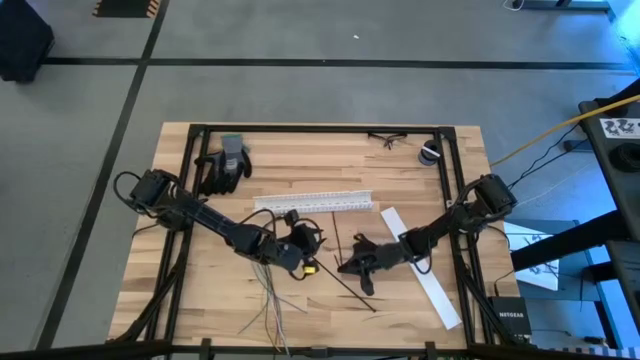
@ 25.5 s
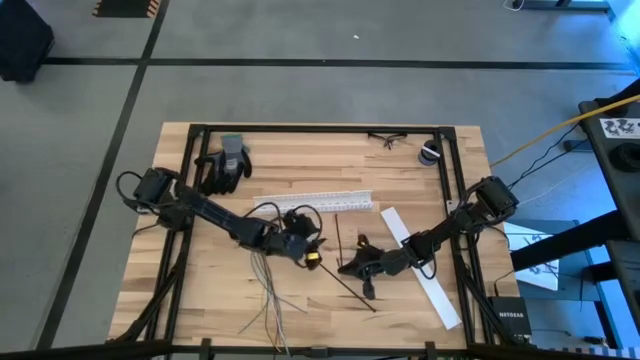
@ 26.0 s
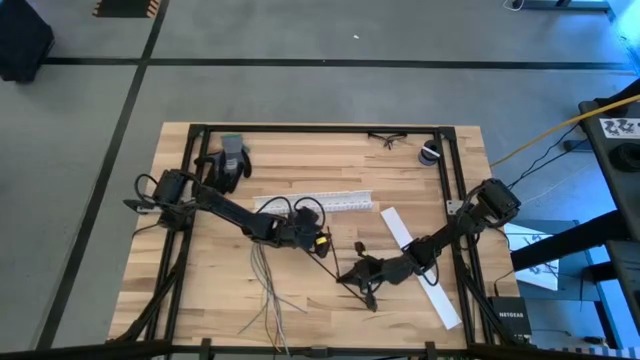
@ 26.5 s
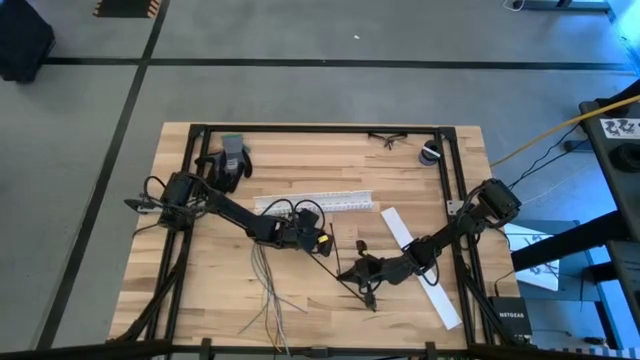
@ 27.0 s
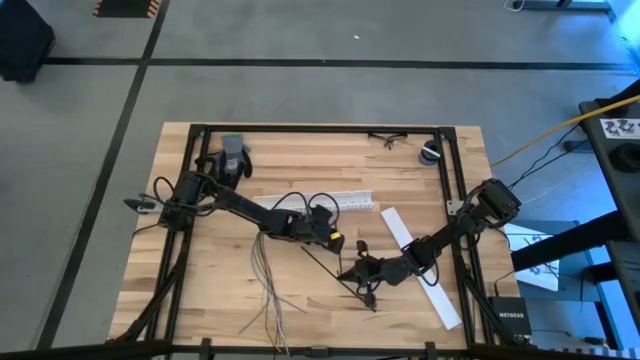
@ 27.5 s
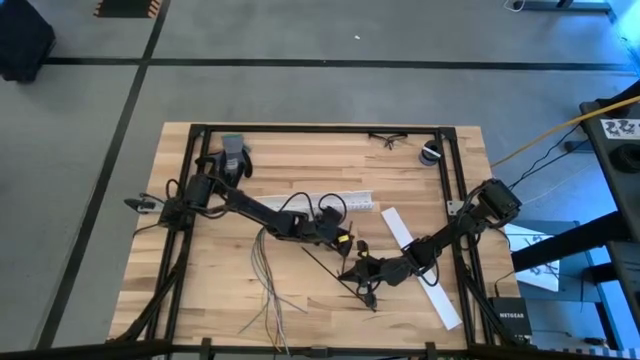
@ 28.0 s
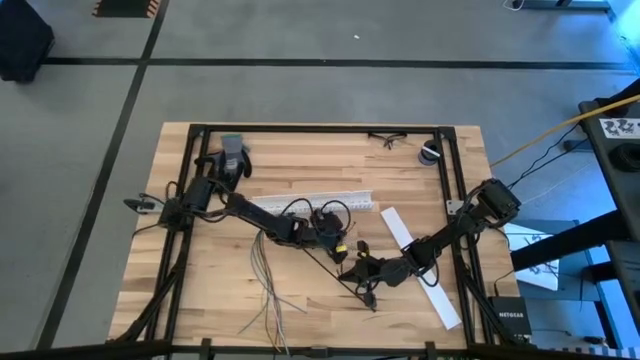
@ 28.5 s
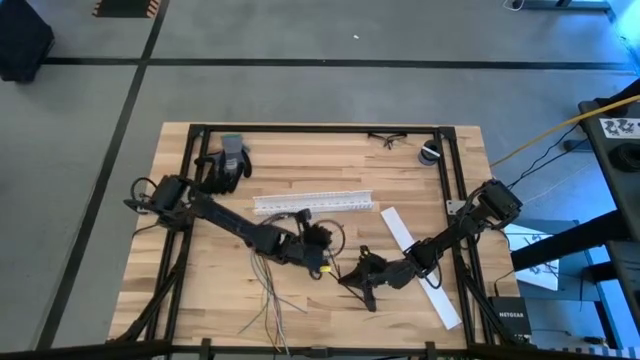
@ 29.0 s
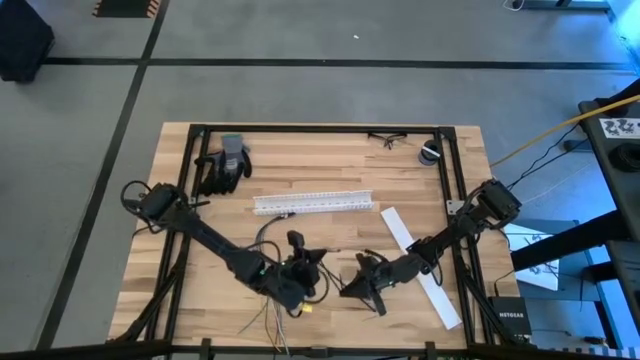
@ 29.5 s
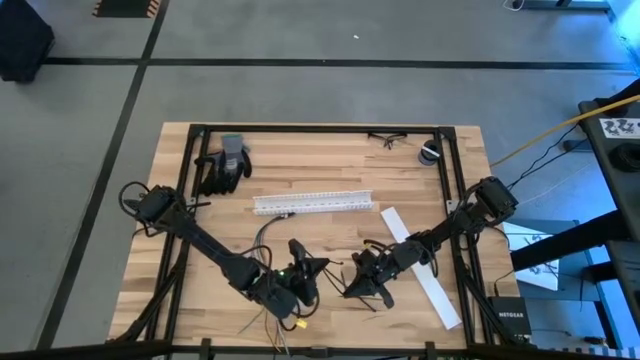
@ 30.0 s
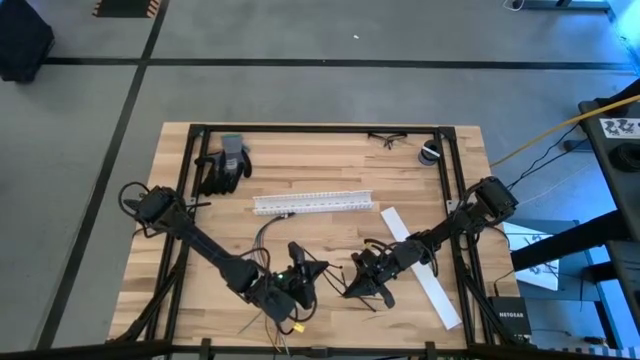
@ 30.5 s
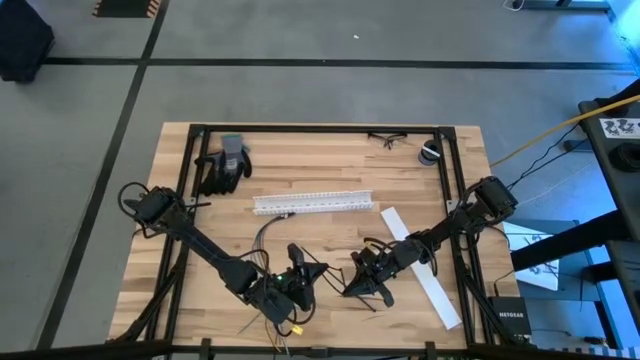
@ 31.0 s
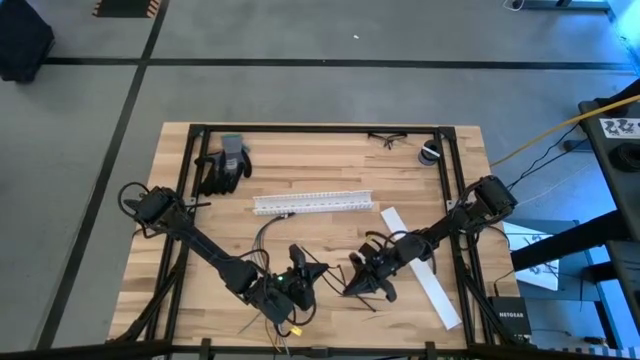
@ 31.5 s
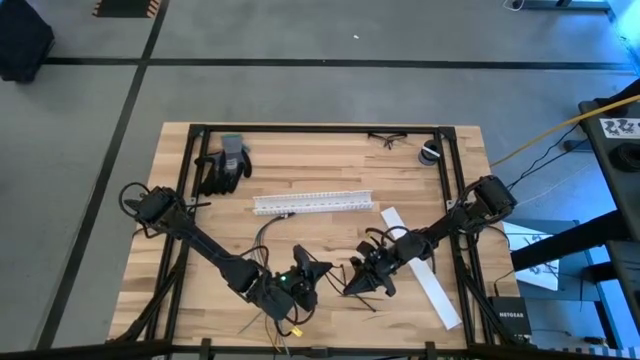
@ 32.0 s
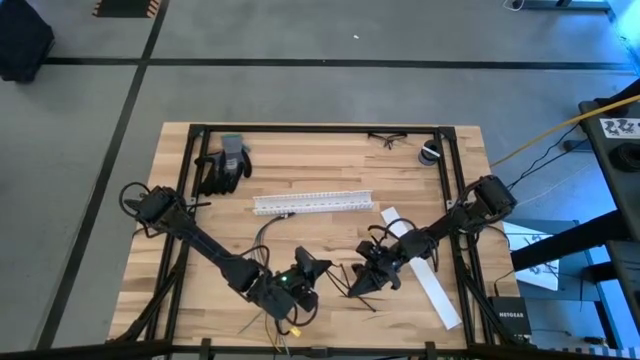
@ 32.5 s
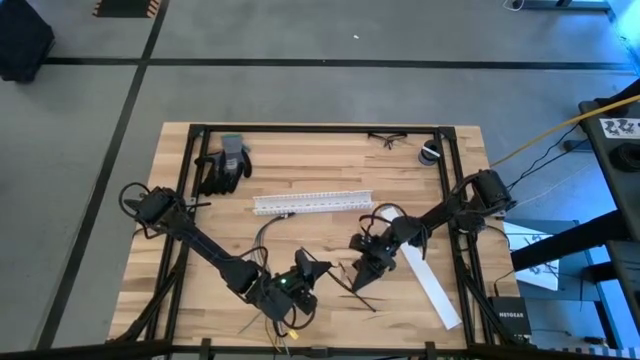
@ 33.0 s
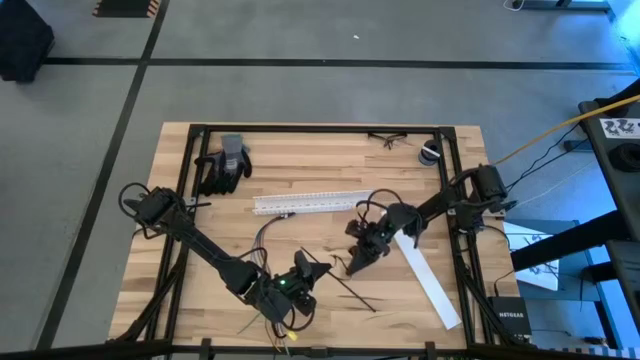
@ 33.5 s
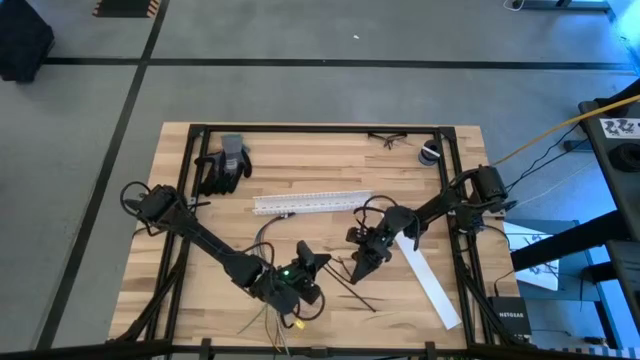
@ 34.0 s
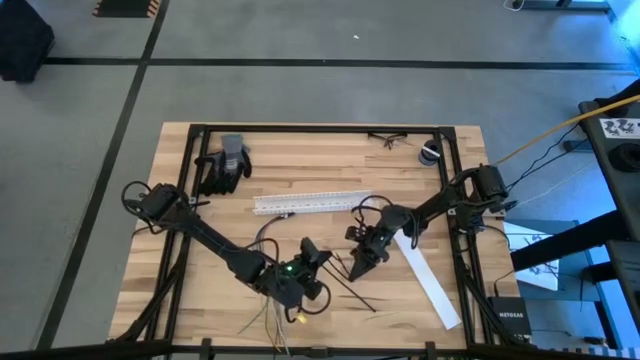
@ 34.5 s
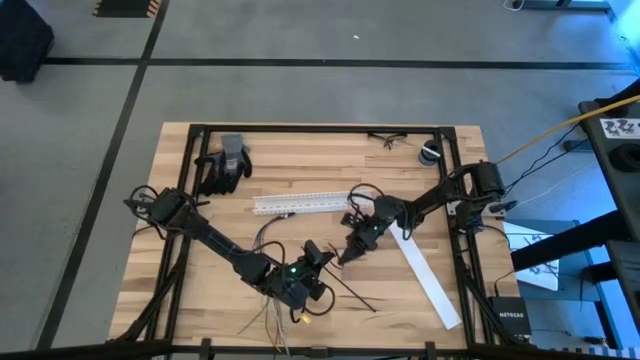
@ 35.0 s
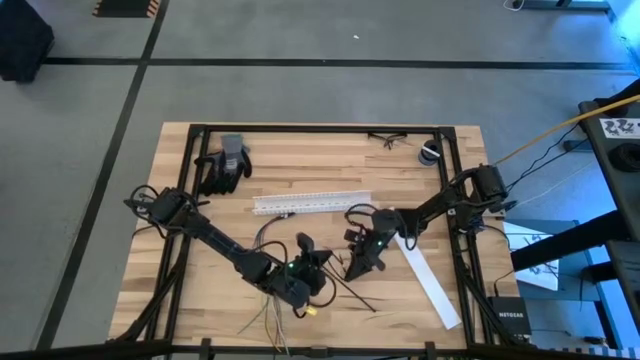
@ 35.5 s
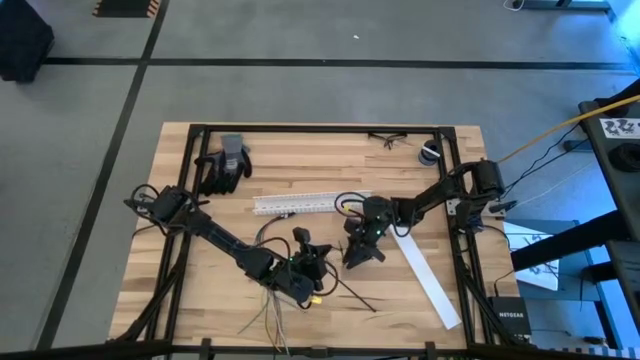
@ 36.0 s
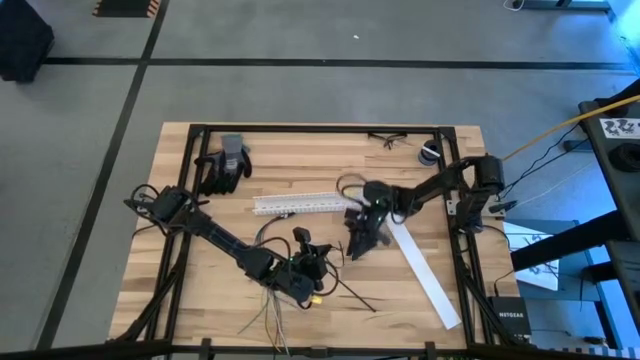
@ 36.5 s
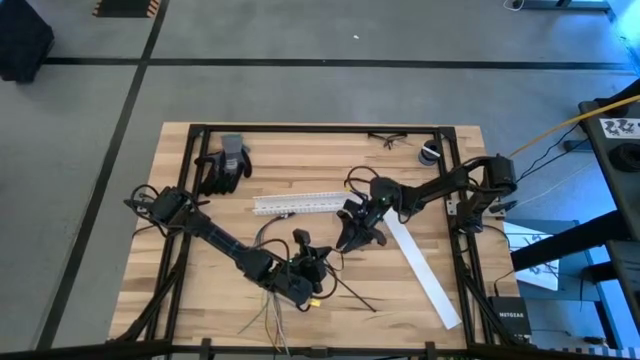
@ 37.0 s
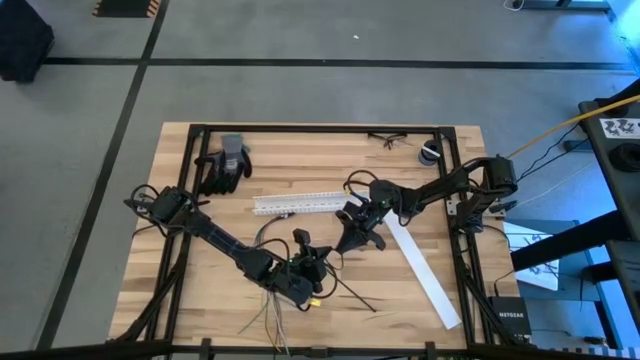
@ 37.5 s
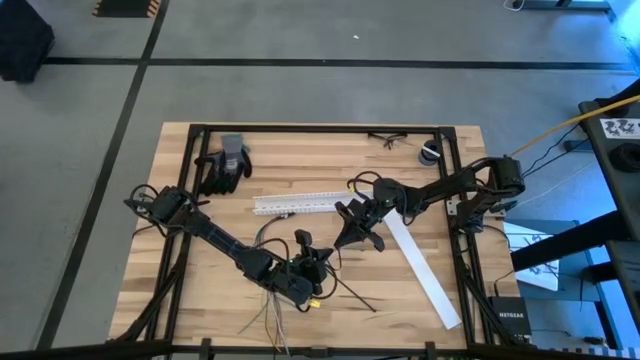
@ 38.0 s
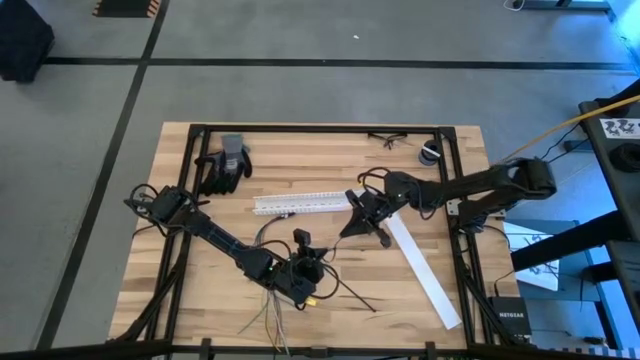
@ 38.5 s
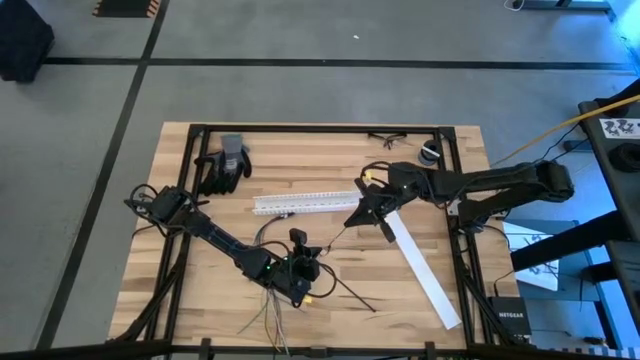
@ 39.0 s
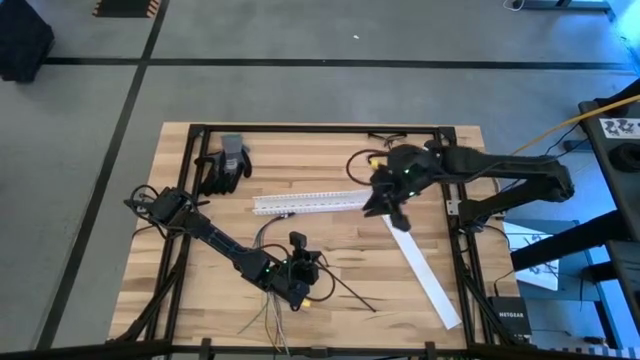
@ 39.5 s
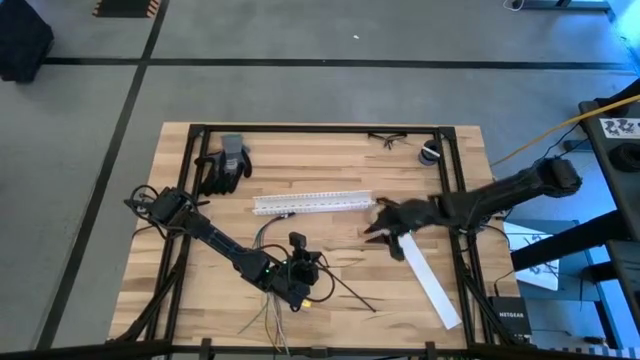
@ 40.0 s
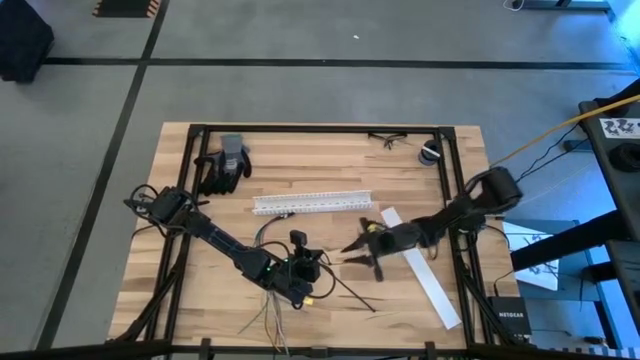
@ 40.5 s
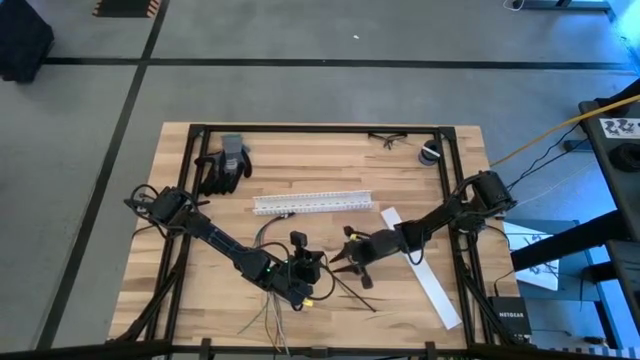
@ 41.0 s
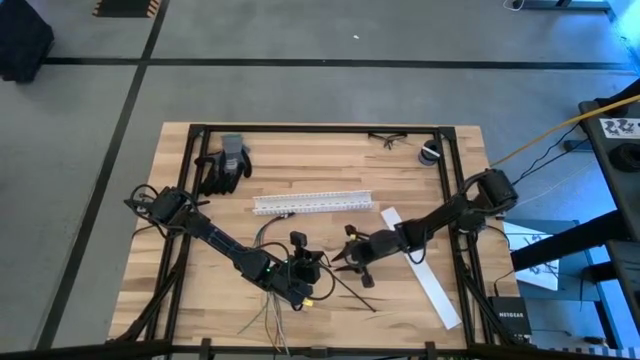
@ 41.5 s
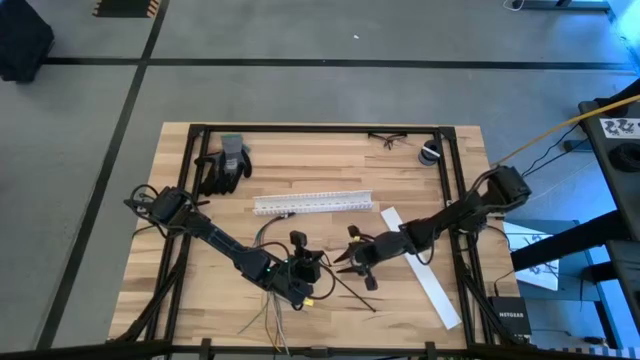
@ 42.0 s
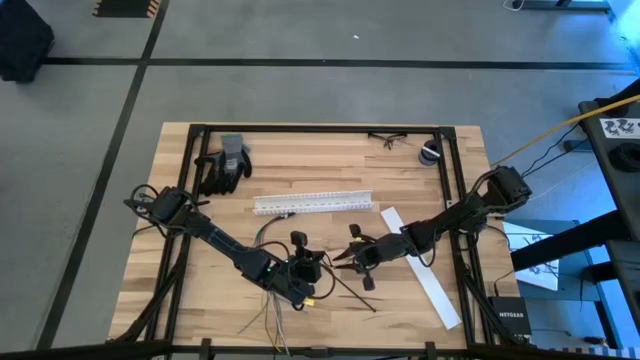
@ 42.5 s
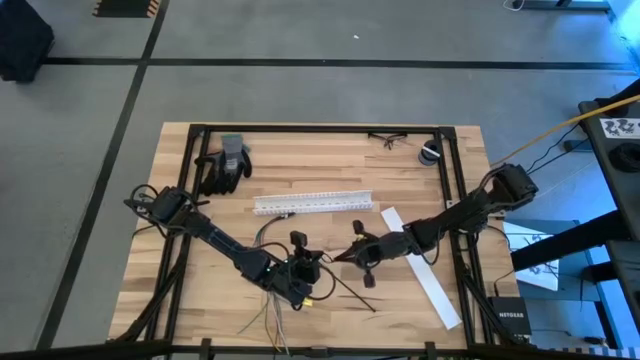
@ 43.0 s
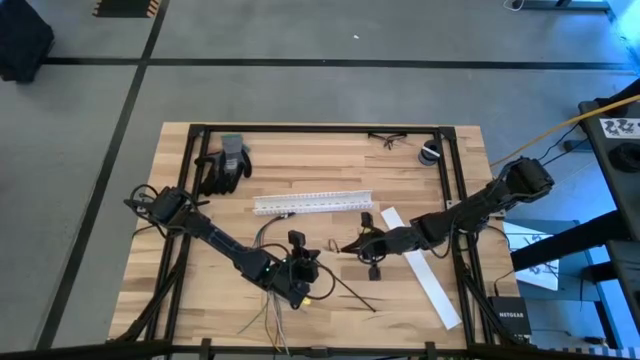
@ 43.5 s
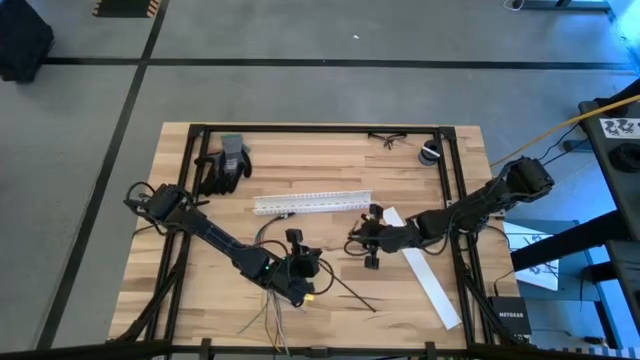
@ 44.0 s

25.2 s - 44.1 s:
Task: Ziptie cables
Prepare the black ziptie
